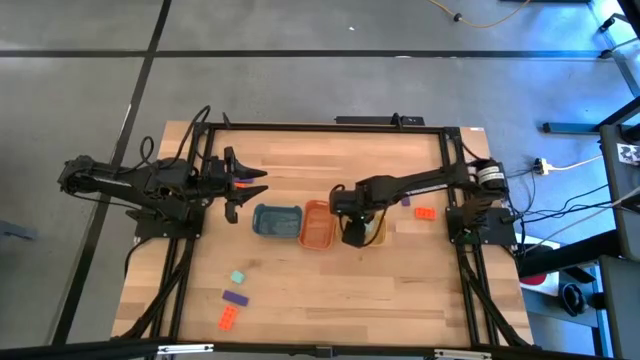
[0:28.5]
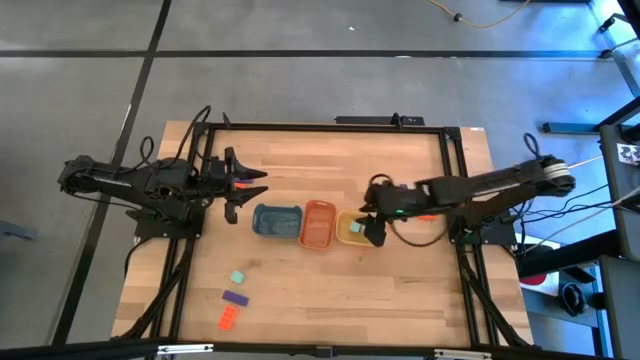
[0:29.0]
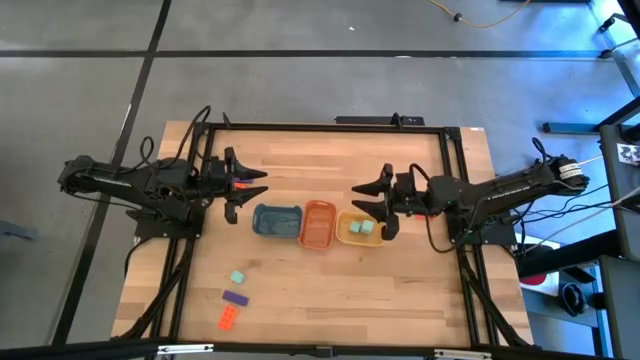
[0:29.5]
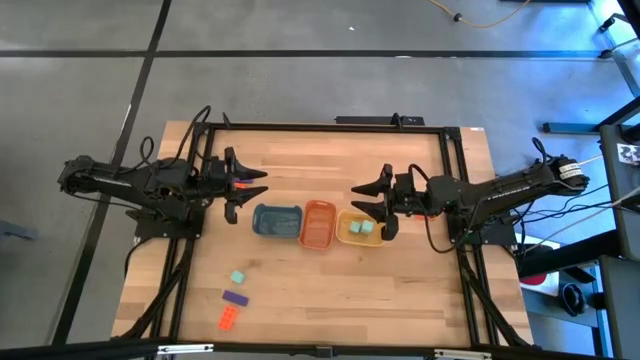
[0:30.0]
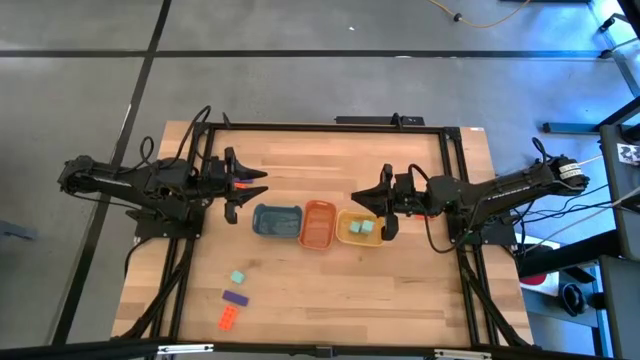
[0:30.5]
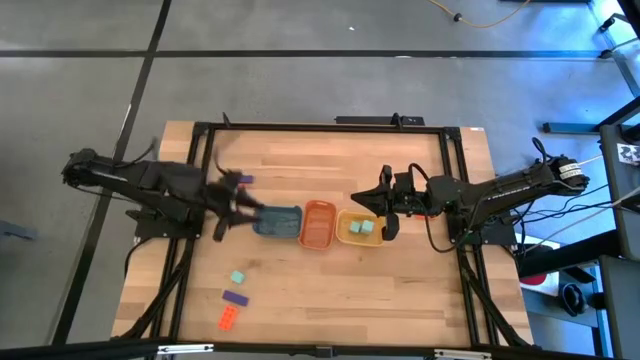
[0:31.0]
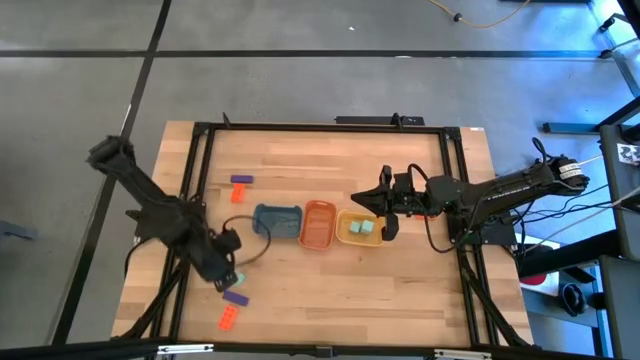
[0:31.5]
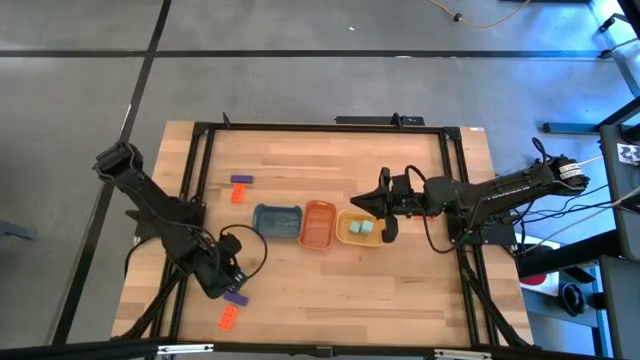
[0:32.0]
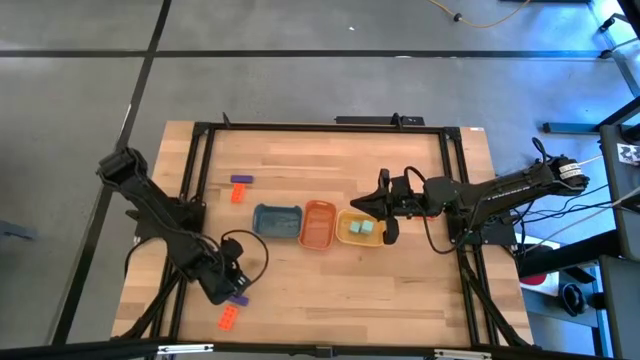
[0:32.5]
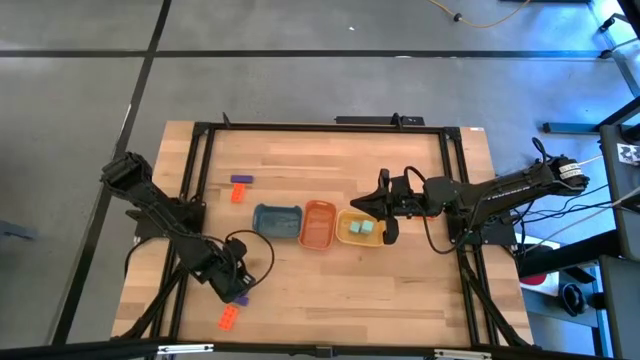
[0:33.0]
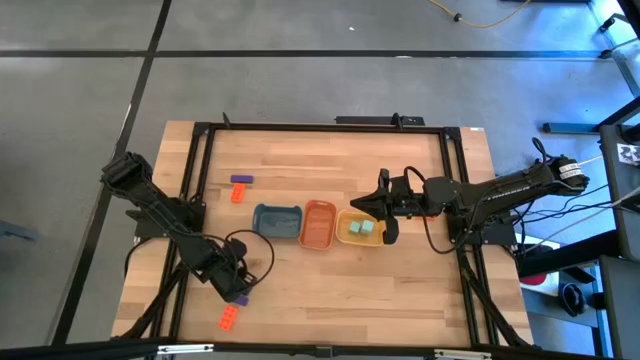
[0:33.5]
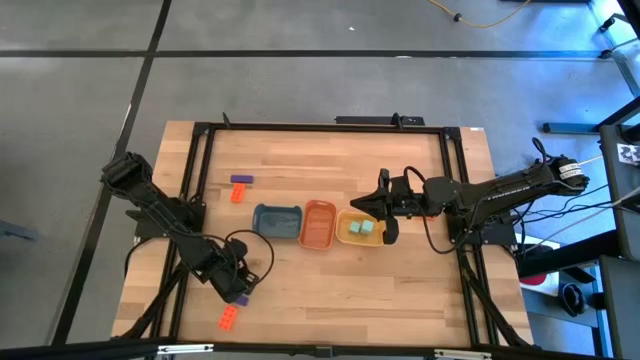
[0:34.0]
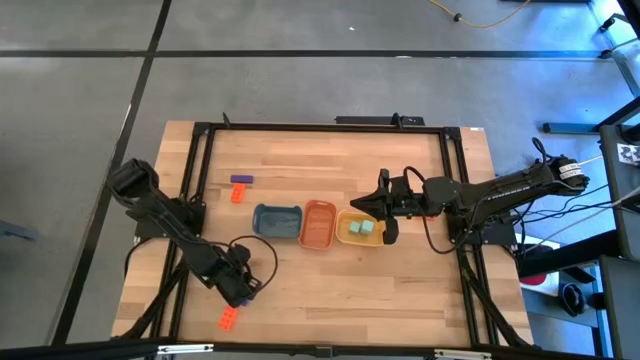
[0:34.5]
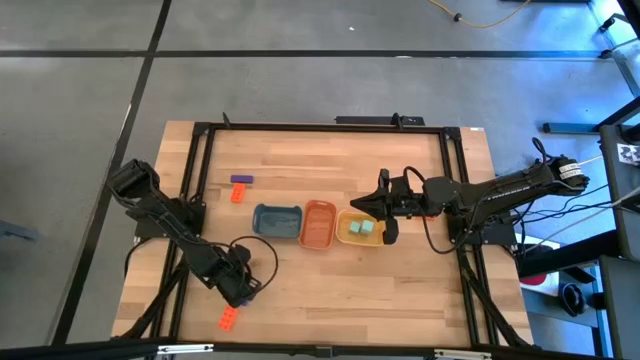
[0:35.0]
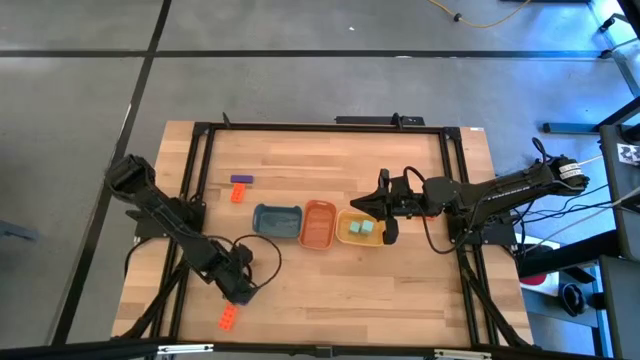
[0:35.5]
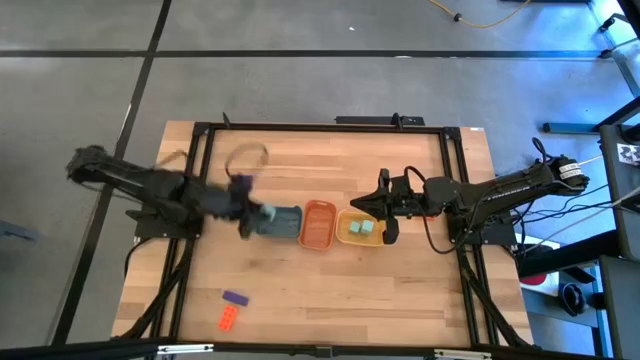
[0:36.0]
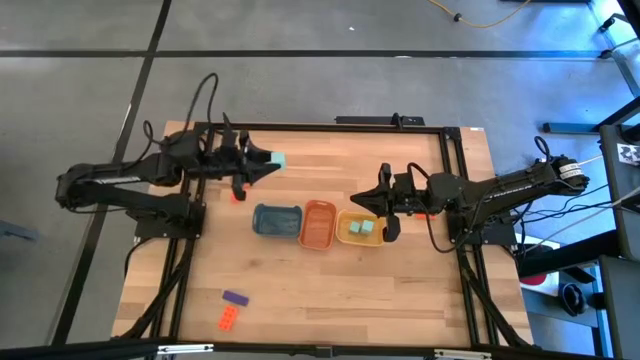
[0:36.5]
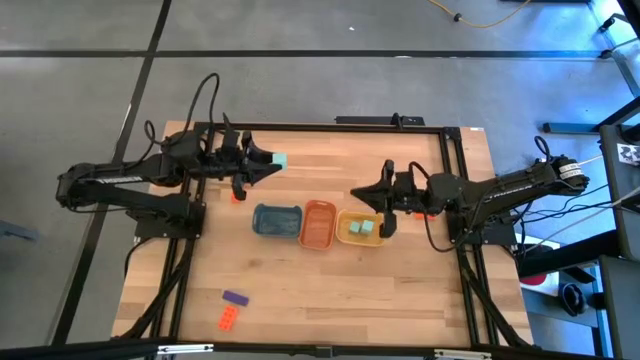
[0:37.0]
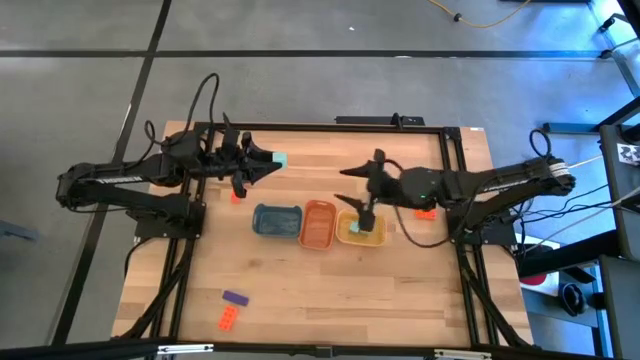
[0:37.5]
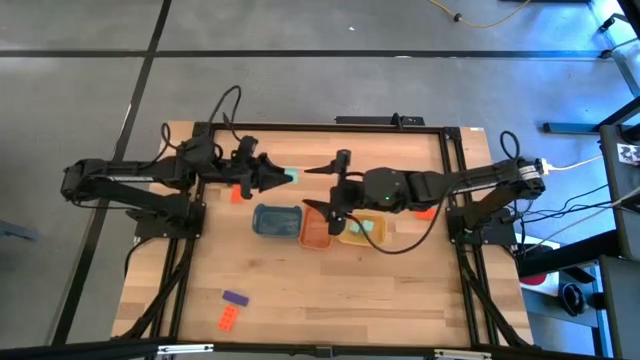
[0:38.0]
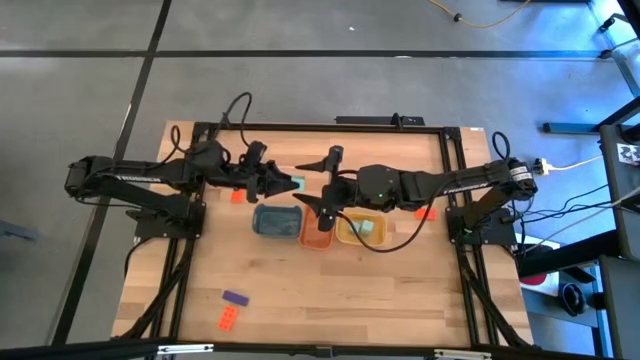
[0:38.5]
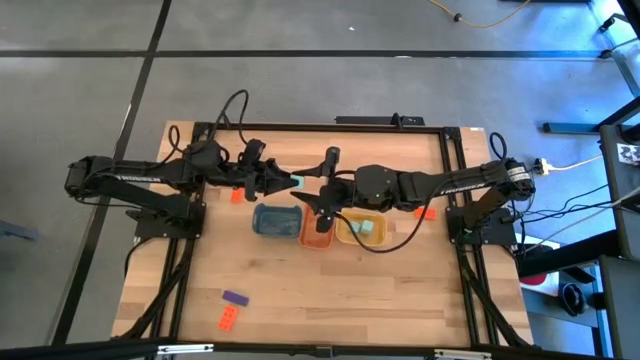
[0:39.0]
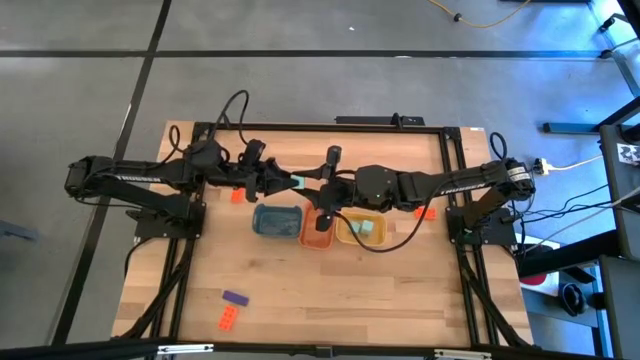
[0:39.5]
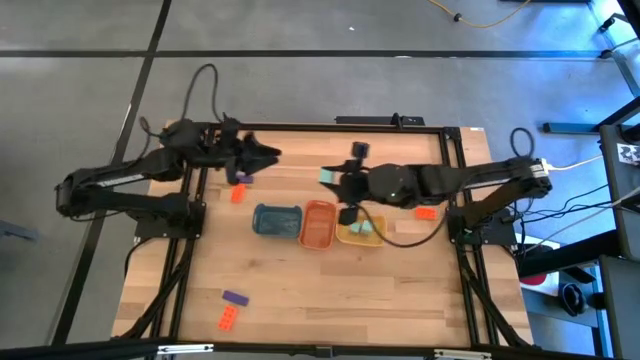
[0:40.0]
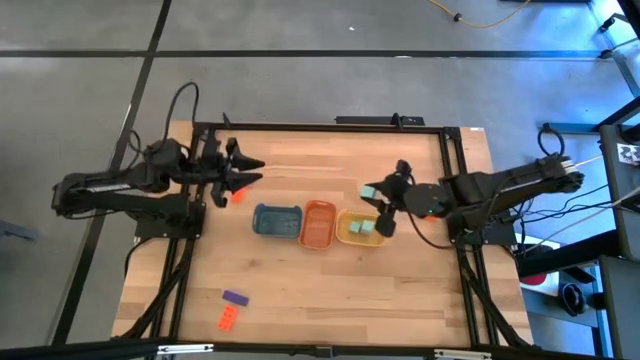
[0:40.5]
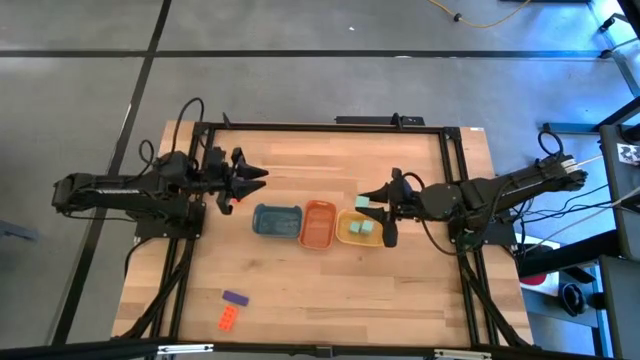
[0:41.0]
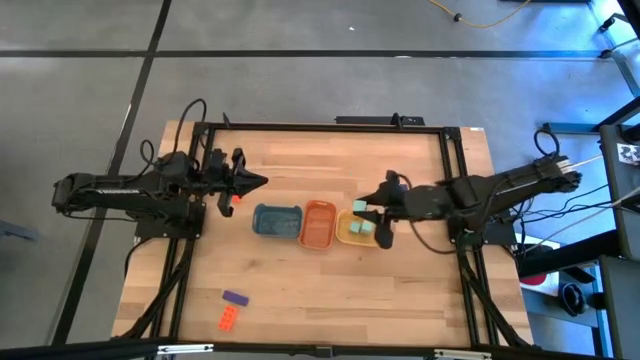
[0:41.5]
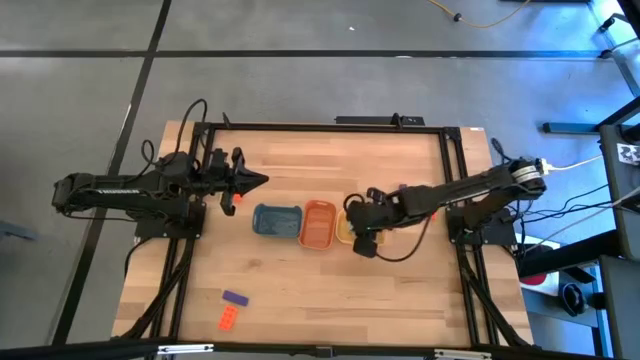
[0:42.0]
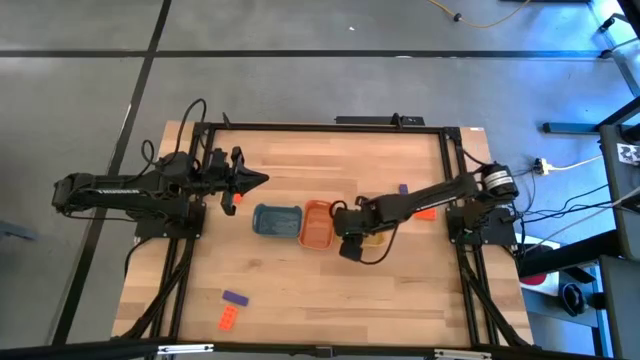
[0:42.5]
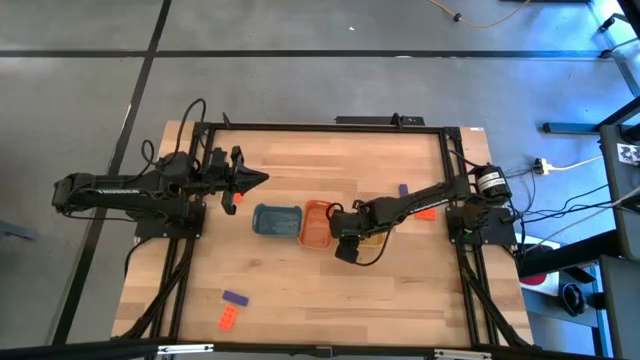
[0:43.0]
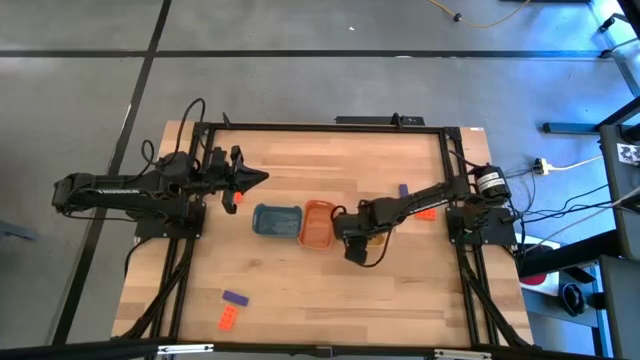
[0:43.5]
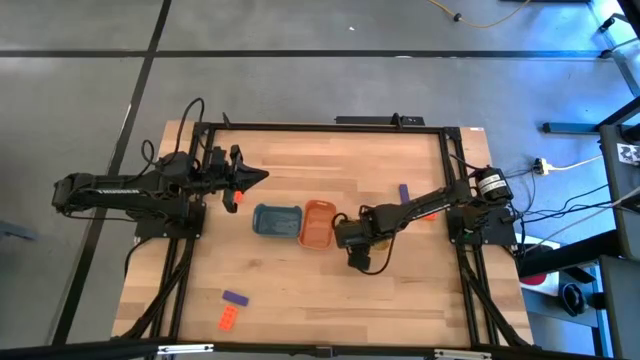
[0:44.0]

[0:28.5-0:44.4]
Task: Sort & place blocks by color
Put the light blue square block into the yellow bin

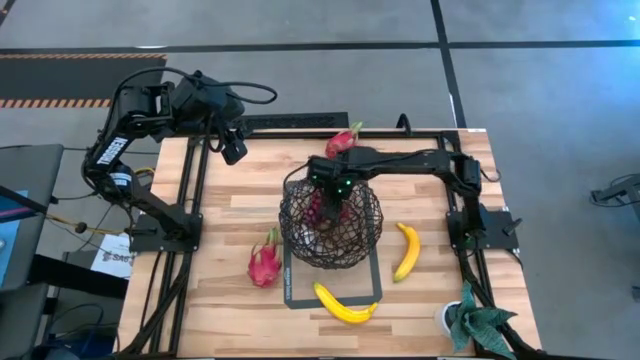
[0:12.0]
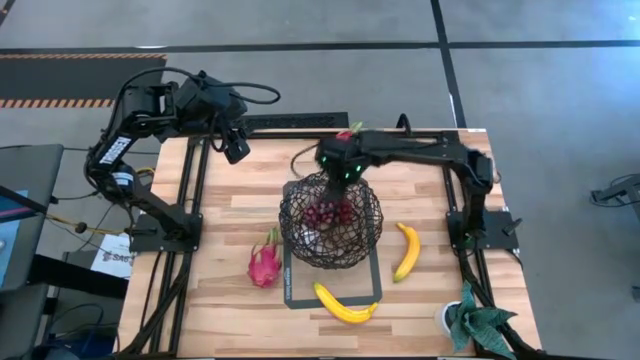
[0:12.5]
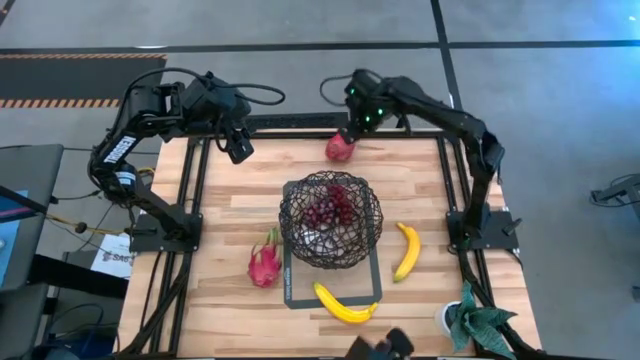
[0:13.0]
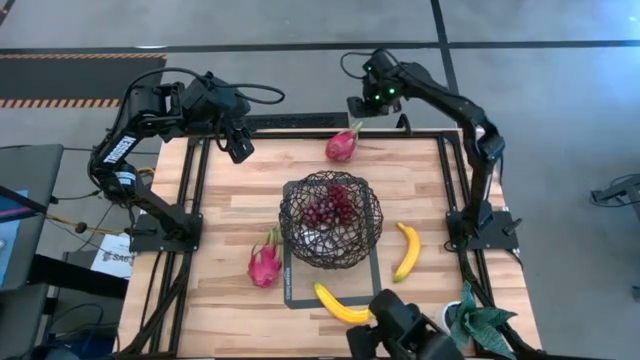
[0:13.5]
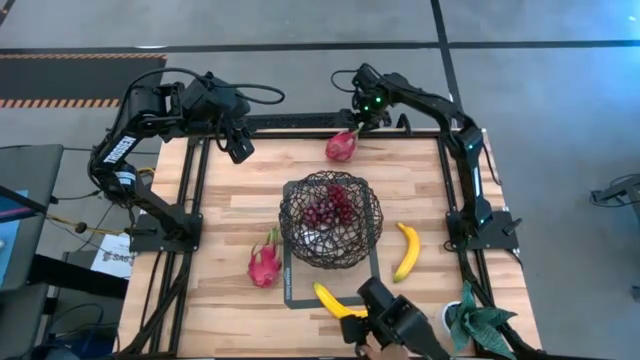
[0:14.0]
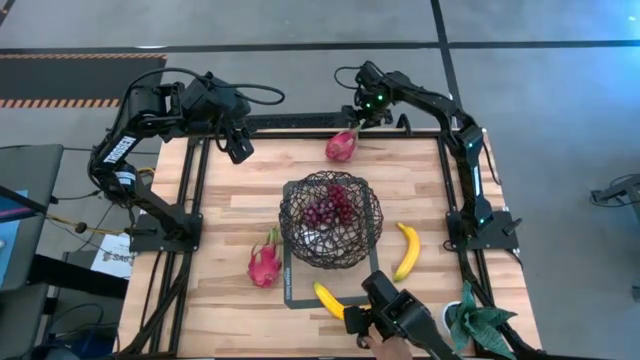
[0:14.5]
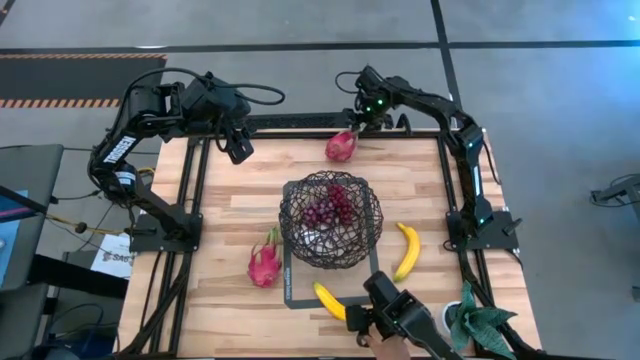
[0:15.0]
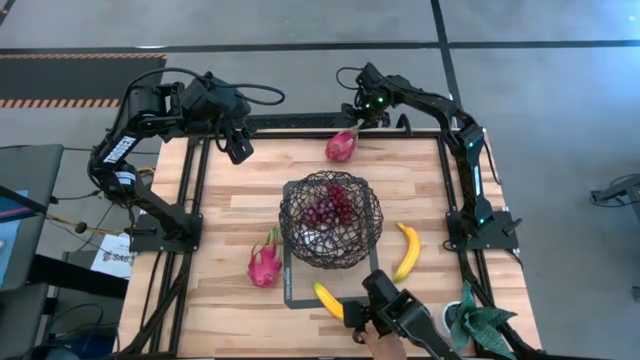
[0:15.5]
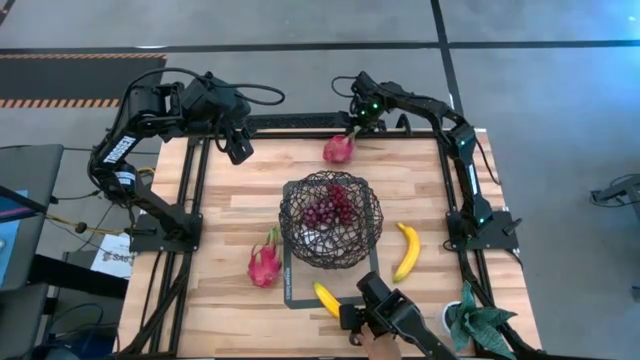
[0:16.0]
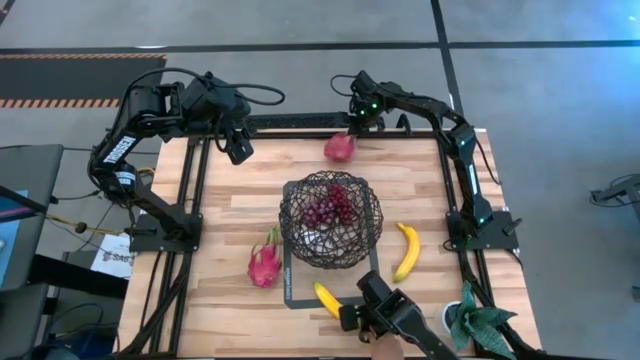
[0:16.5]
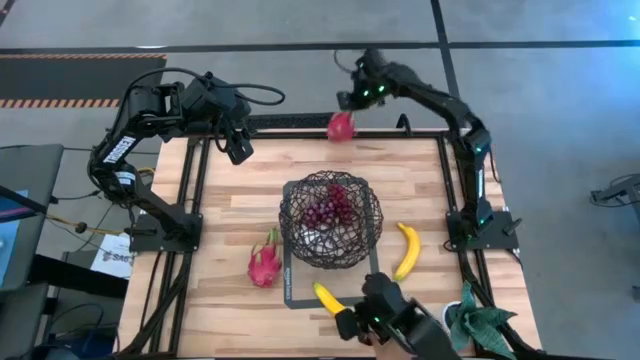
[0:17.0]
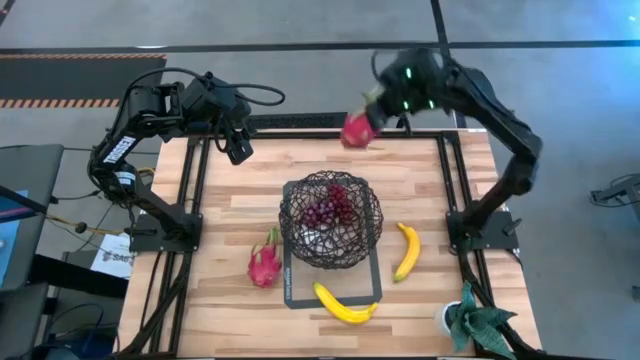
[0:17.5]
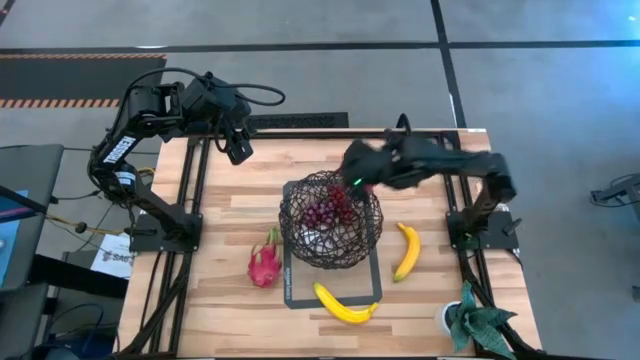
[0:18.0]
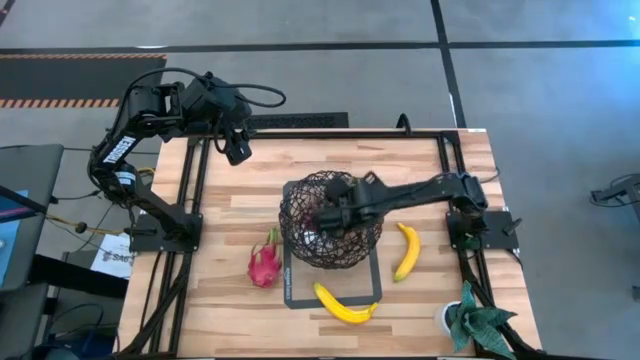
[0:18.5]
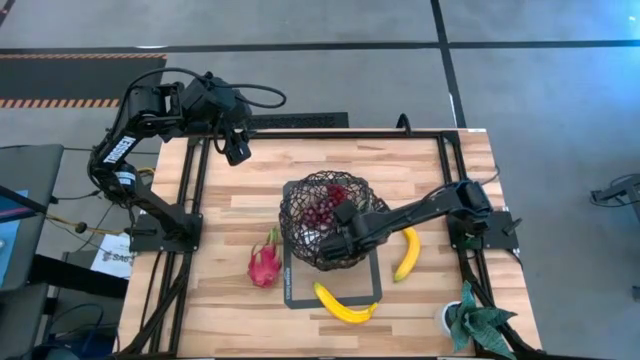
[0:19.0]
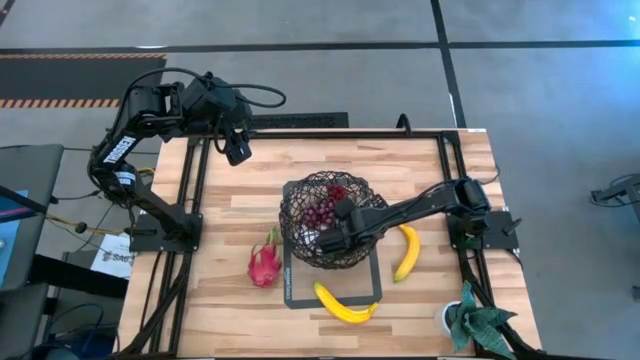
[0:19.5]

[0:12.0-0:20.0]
Task: Build produce basket
Put the top red dragon fruit into the black wire basket
